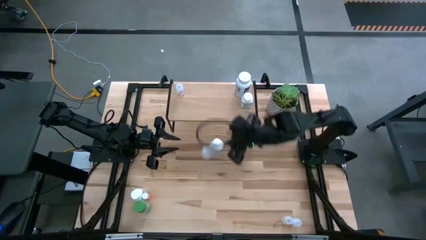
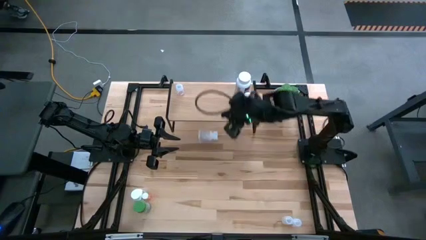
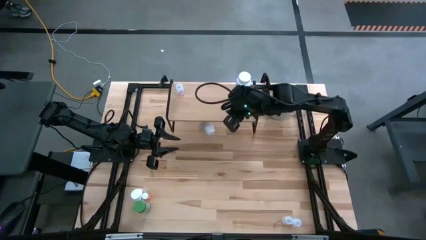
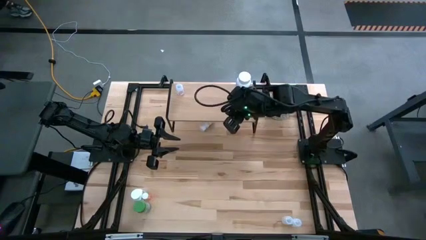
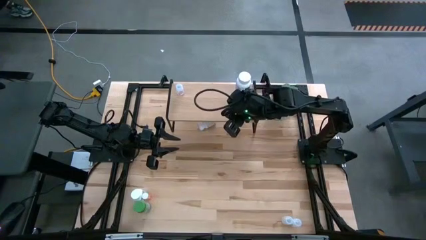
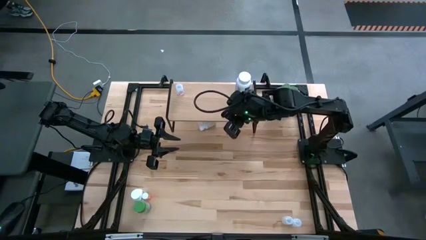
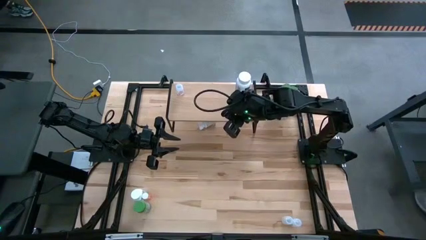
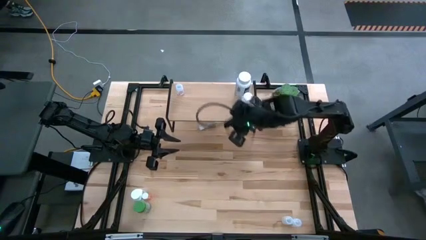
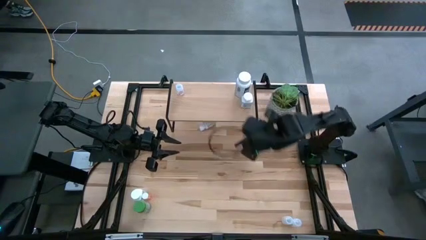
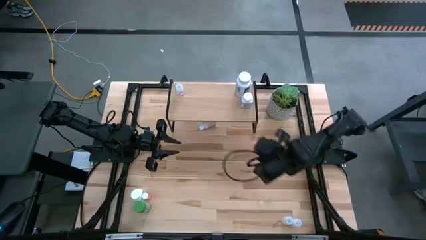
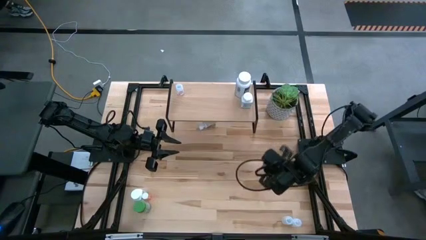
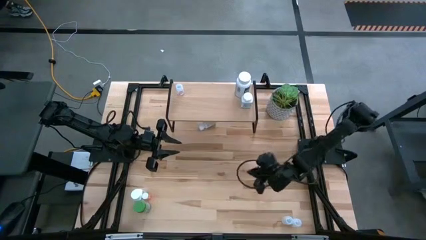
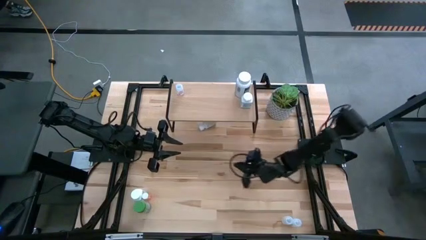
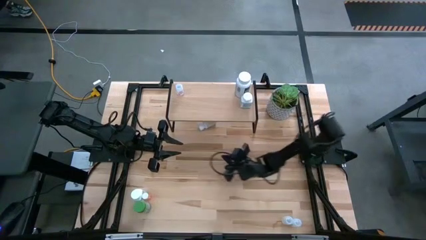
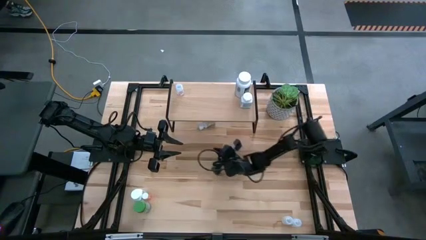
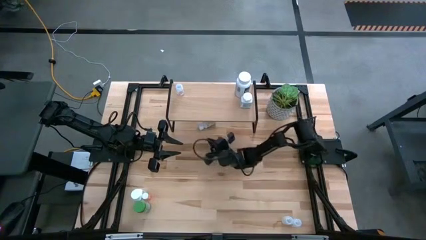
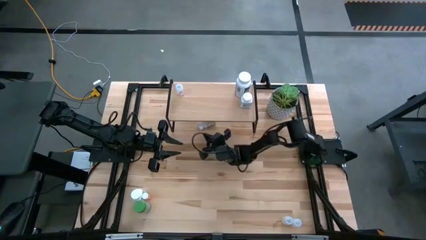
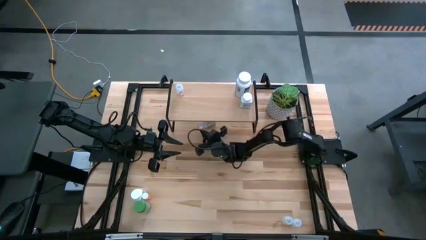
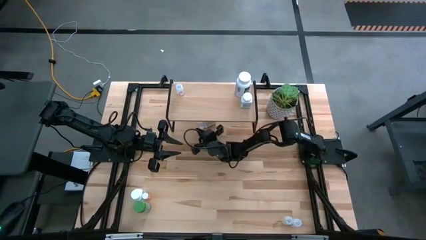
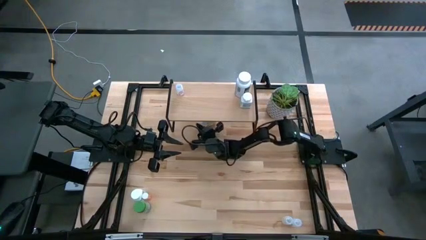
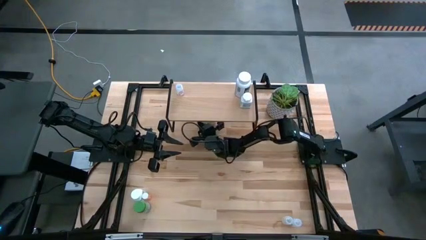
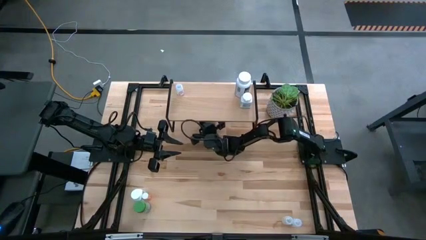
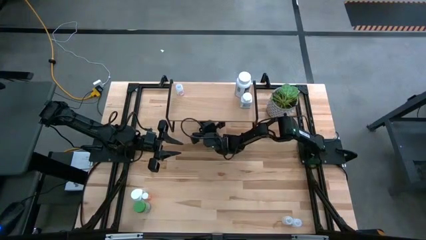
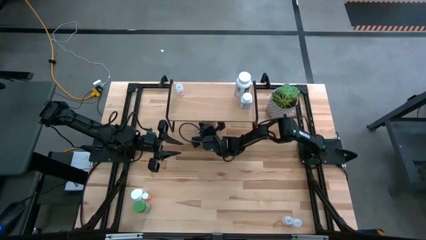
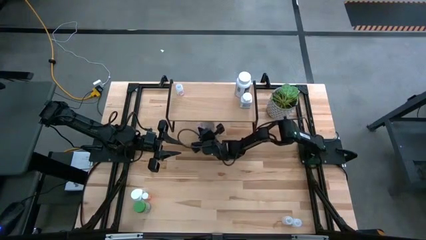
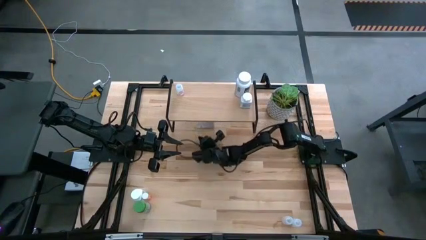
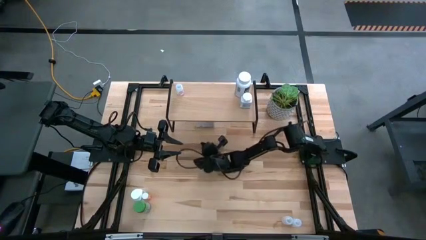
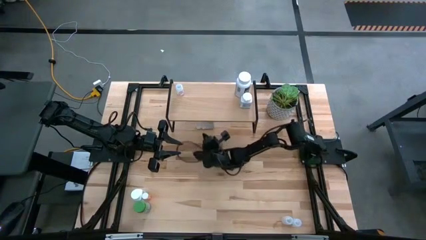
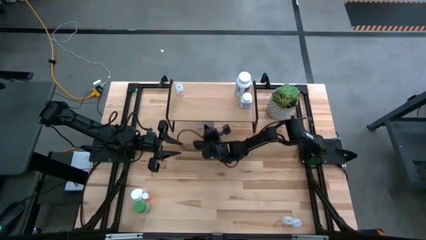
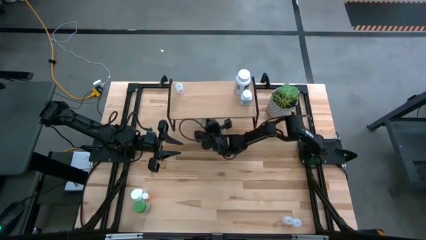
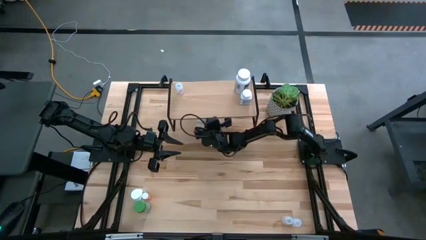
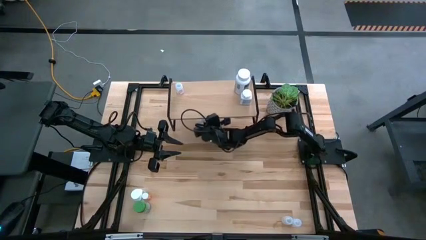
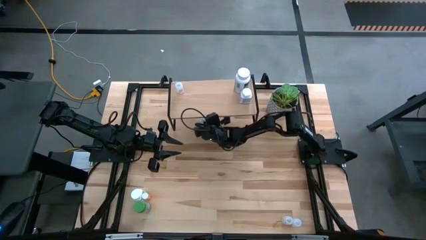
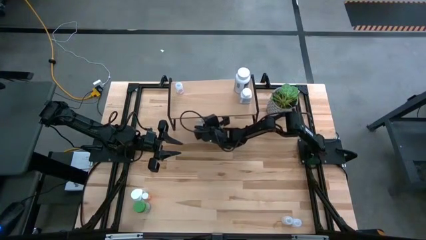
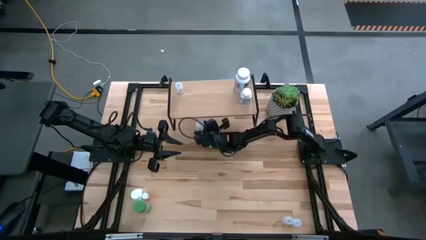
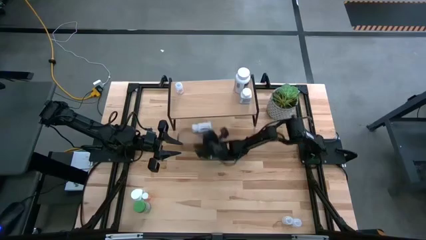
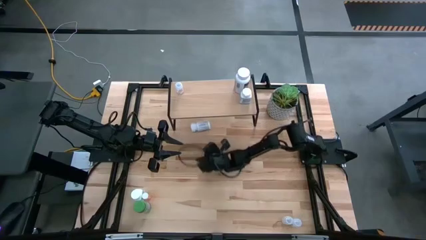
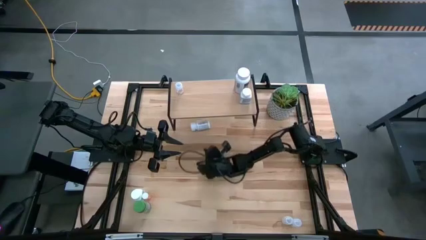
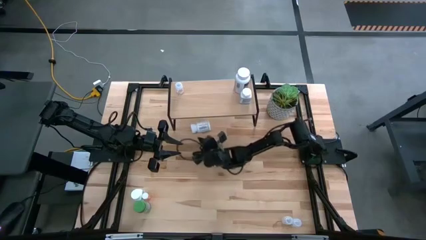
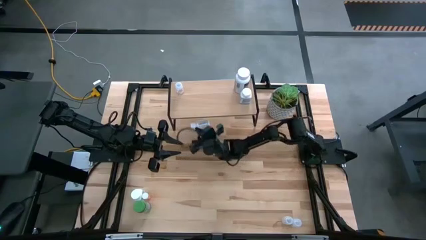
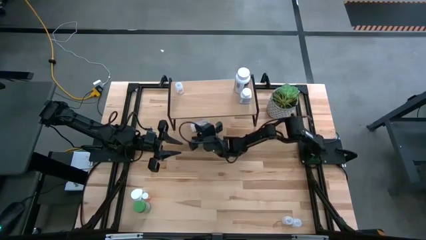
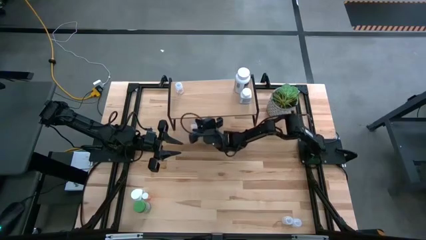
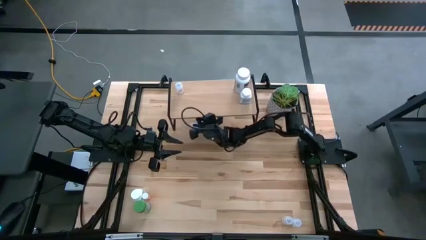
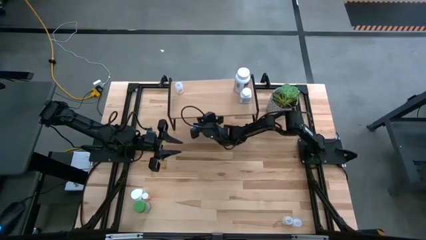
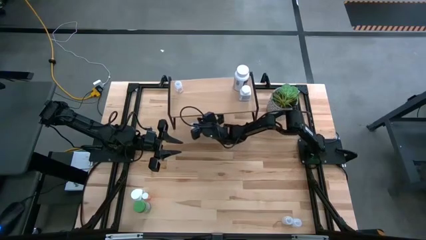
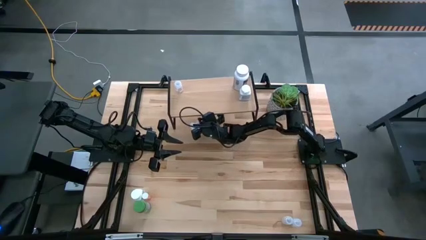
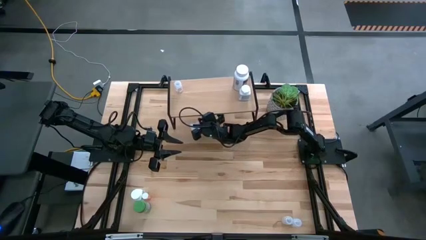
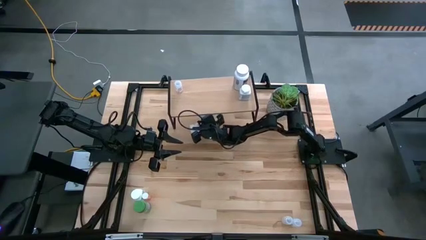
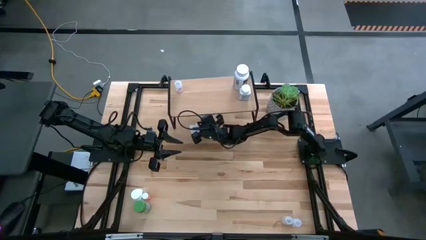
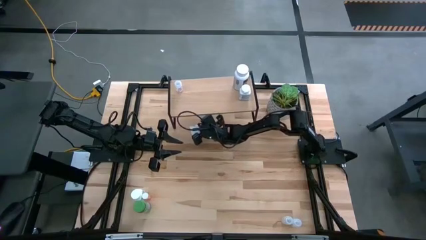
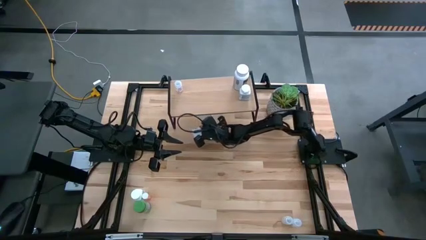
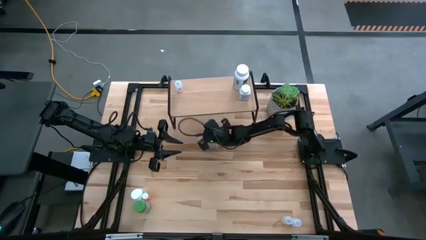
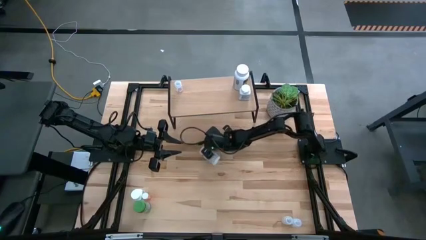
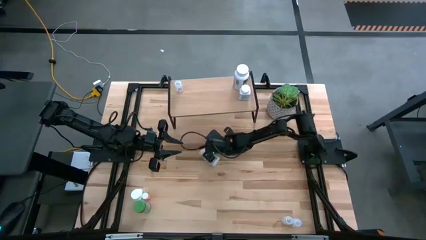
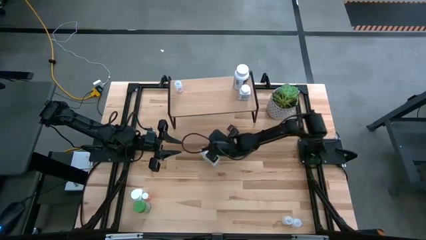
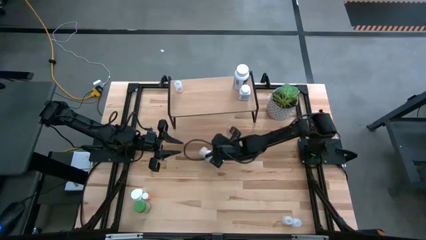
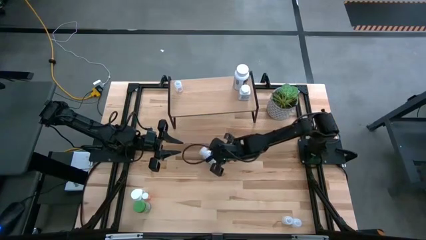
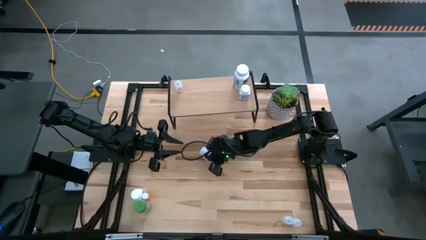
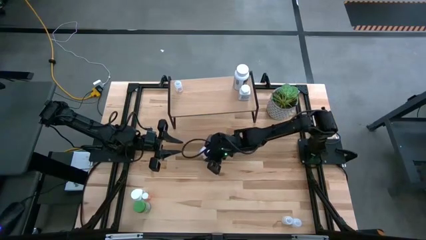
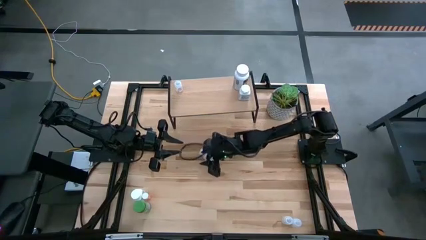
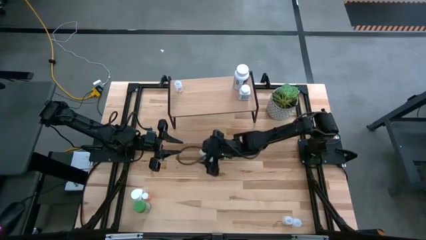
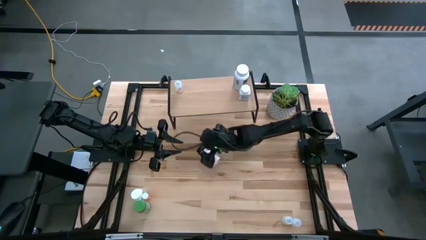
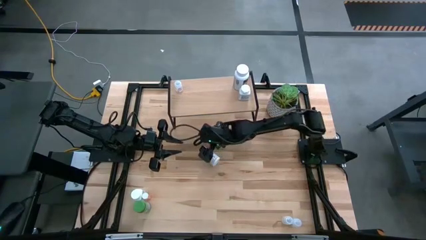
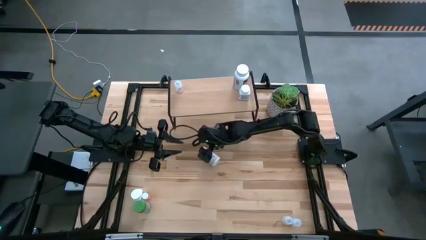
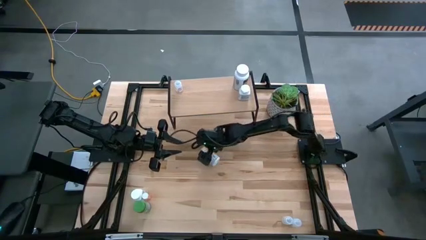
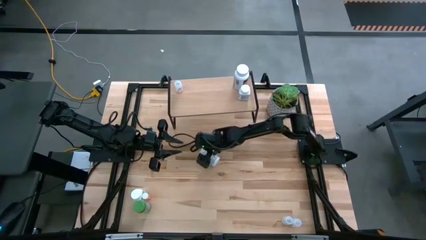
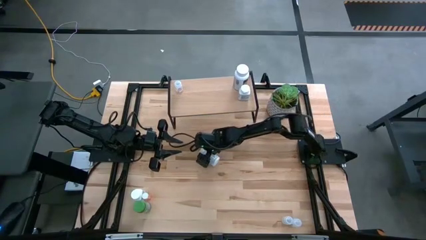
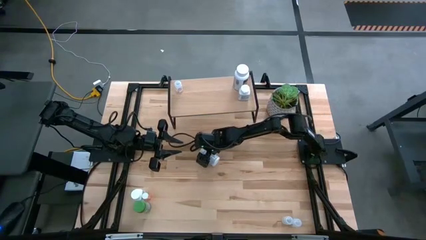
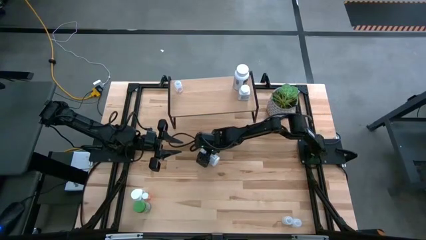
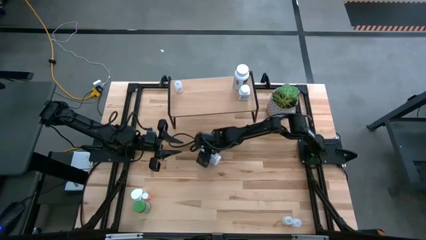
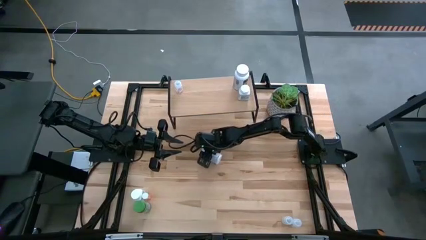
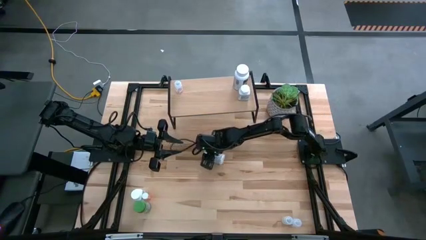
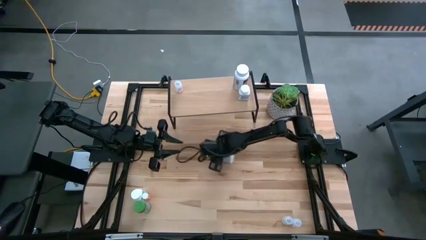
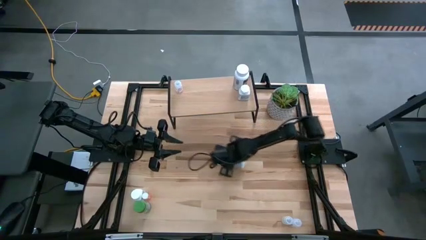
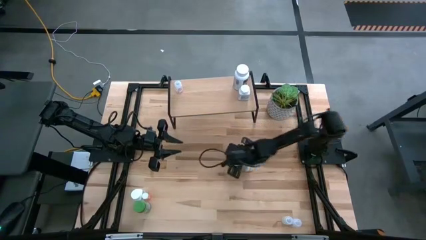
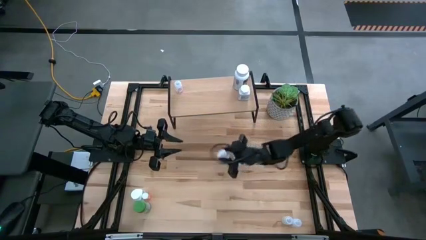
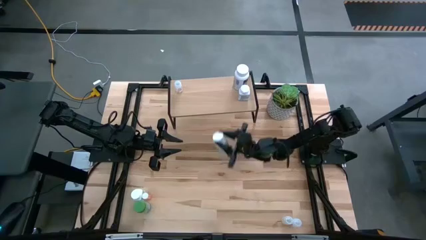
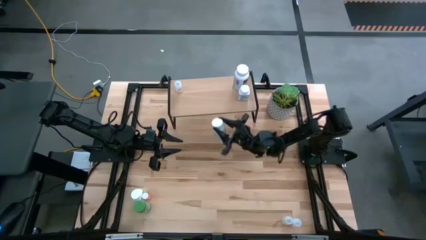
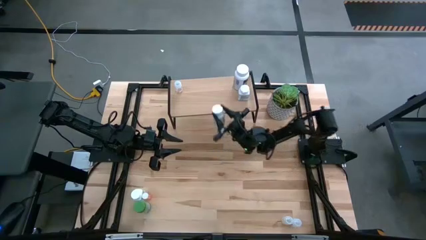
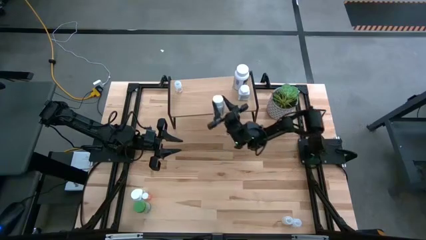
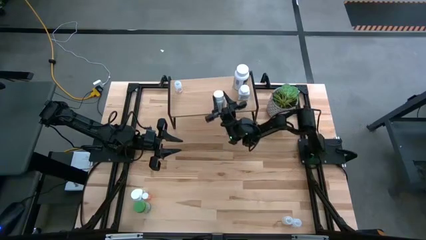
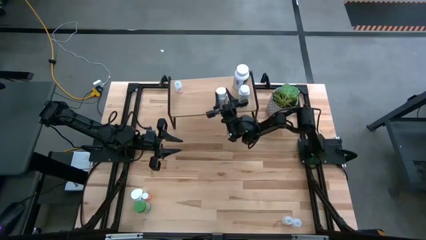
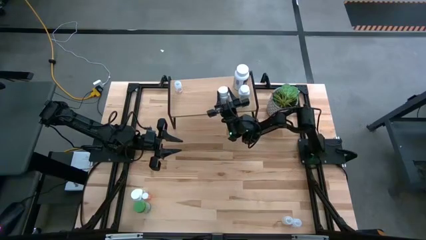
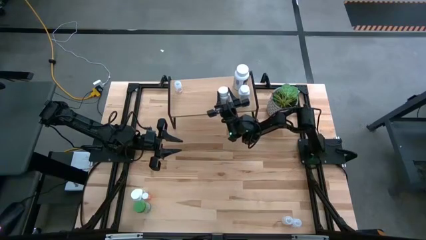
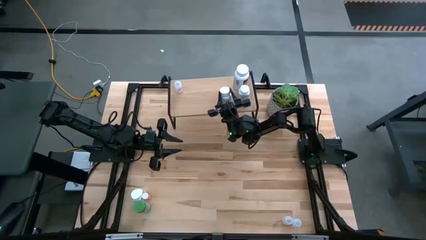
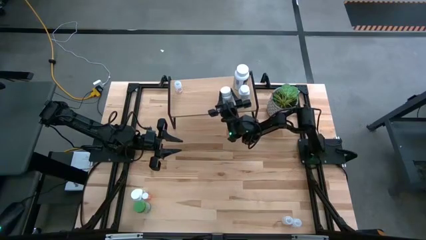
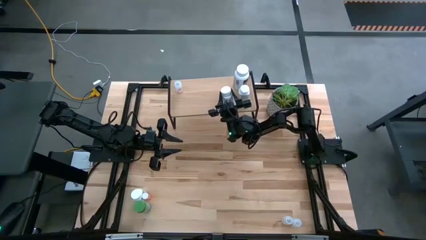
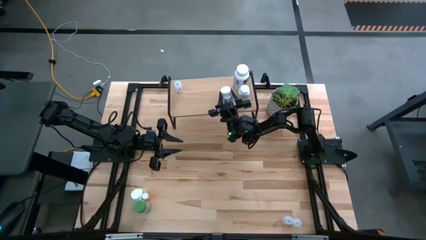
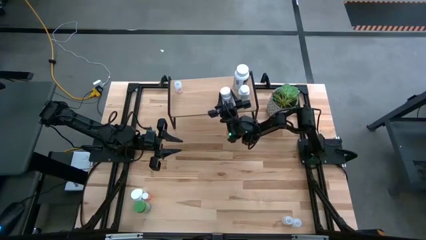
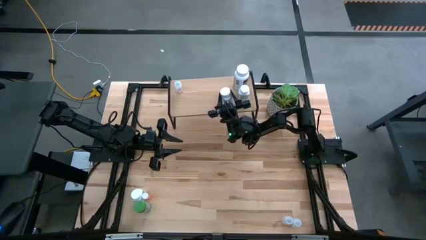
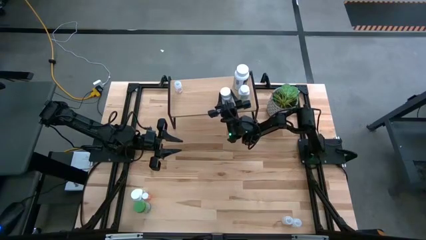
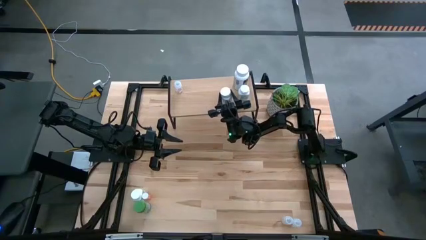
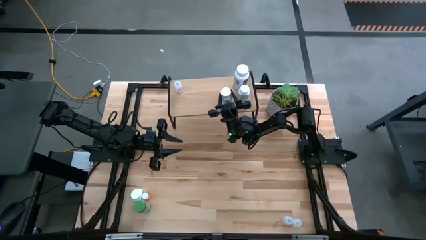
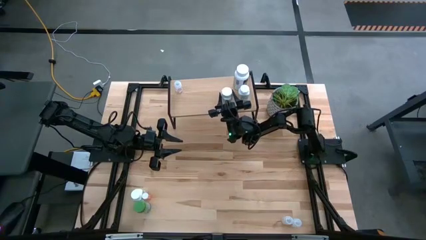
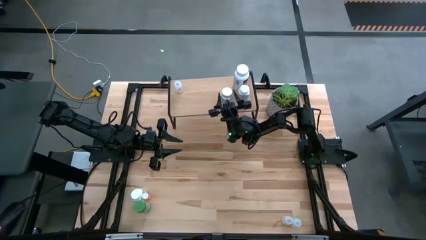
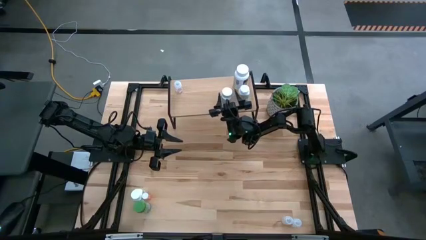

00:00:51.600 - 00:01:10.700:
Task: Pick and place medicine bottles onto shelf by color
Put the right white pill bottle on the shelf
